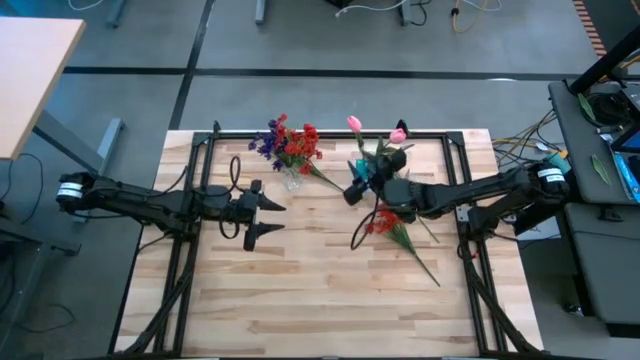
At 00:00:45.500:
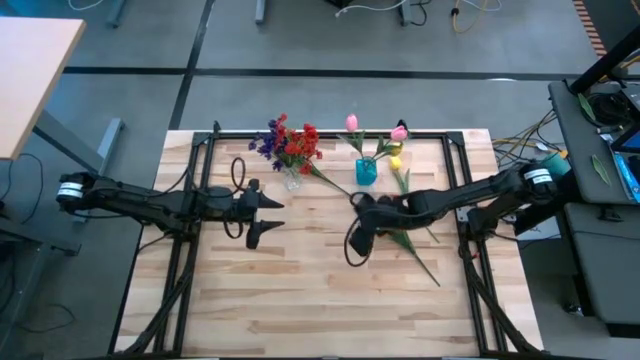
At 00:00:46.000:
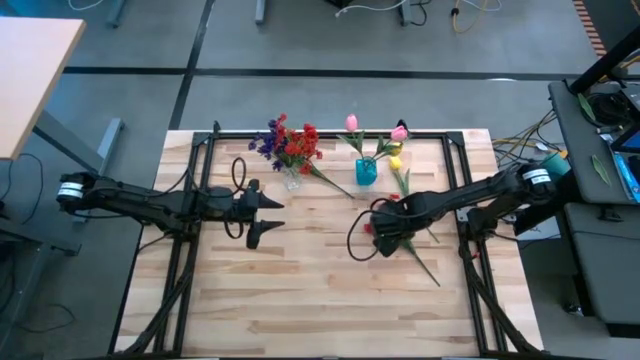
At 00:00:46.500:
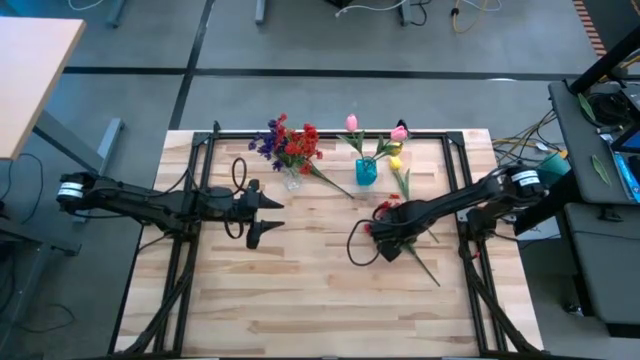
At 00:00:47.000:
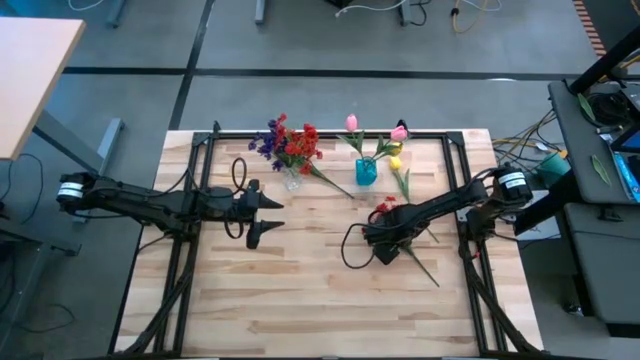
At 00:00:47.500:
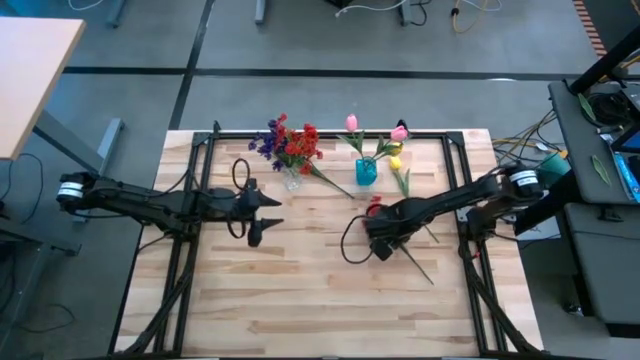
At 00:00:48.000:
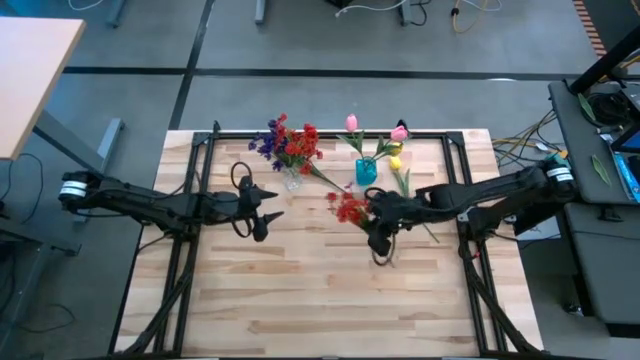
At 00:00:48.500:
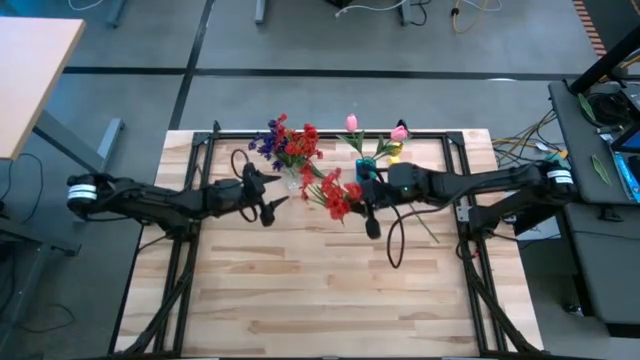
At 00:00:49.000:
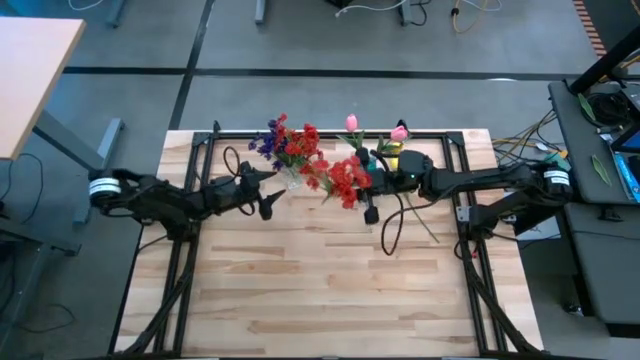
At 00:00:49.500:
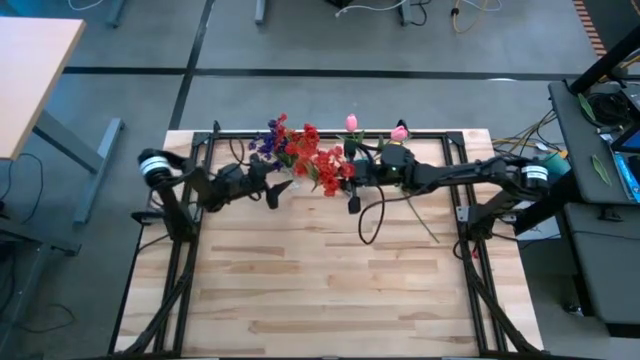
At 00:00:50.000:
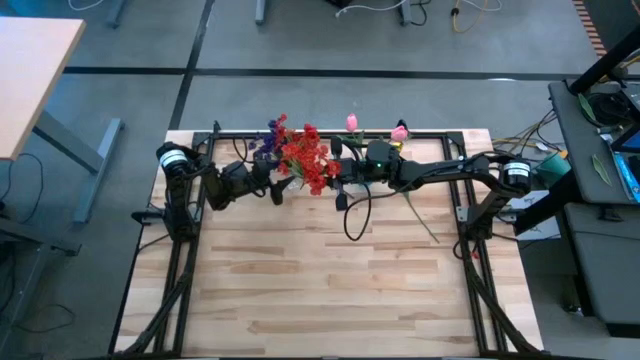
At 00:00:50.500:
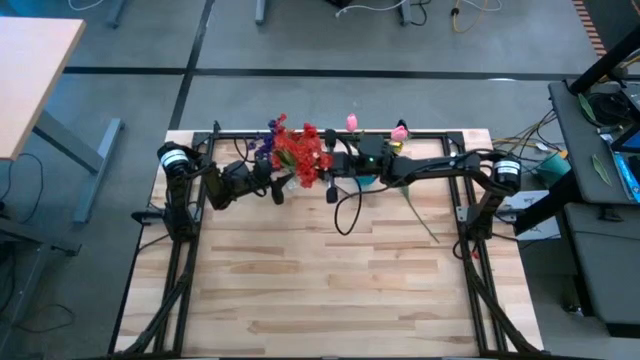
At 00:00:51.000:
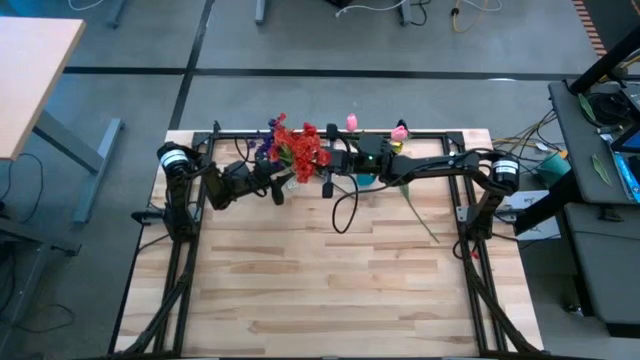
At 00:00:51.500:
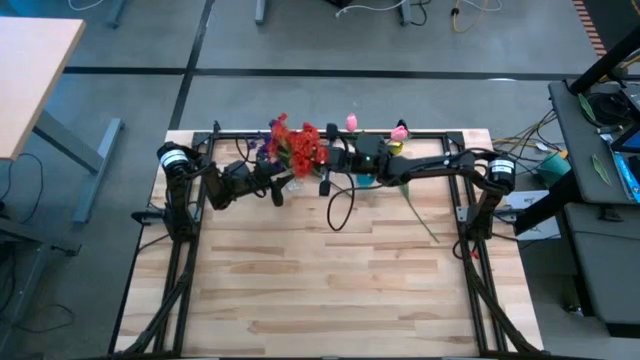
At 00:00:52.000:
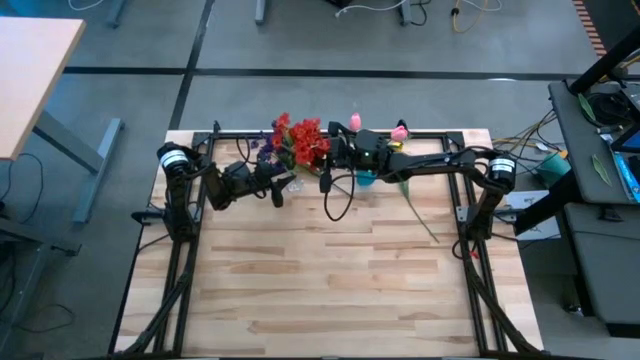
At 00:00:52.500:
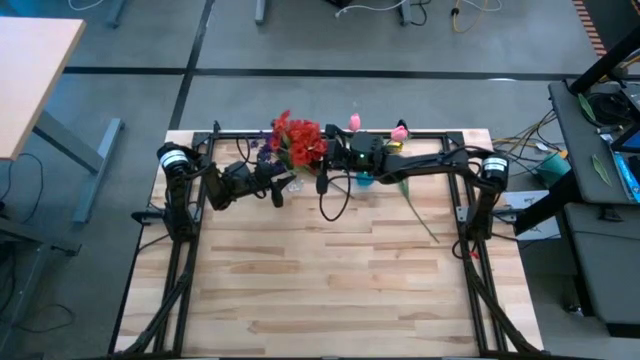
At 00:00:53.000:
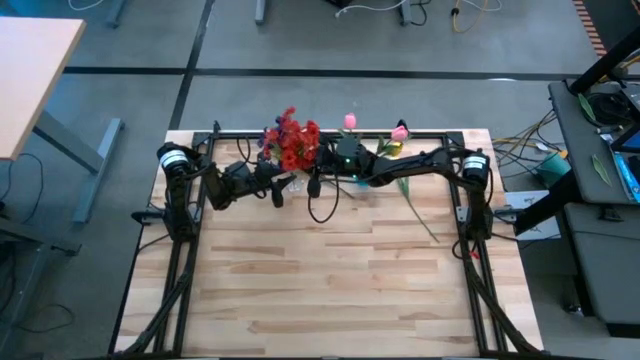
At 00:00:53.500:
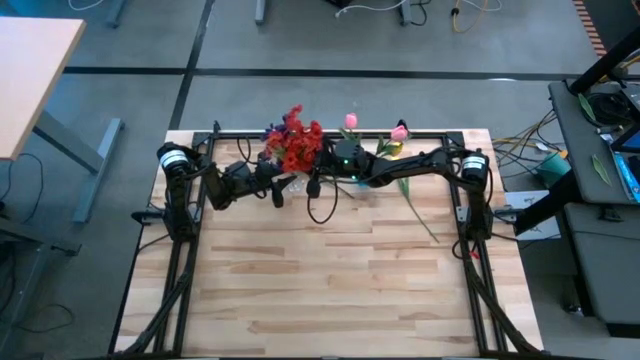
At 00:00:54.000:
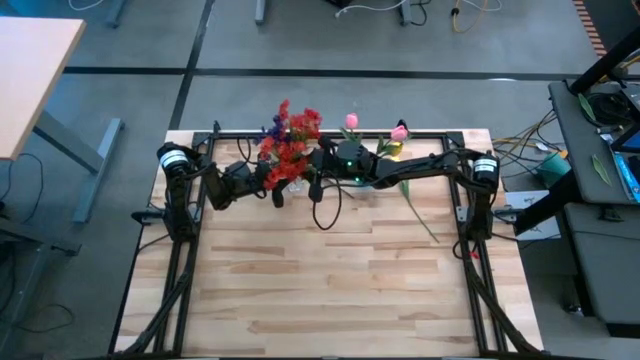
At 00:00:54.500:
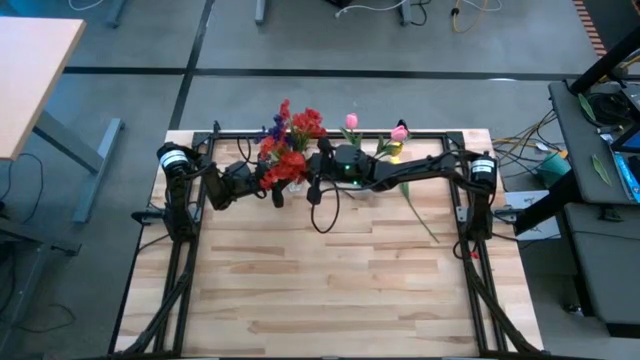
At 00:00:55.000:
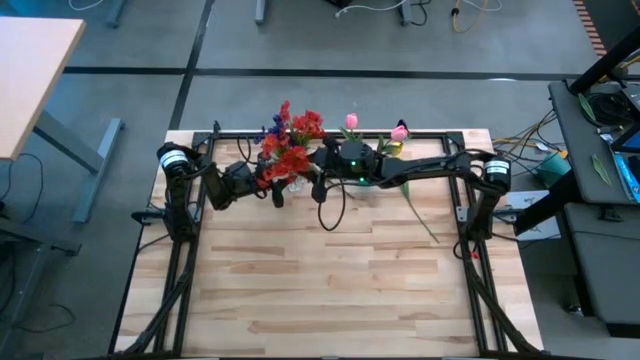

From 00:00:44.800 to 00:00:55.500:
Task: Sort flowers into vase by color
Put the red flowers into the transparent vase

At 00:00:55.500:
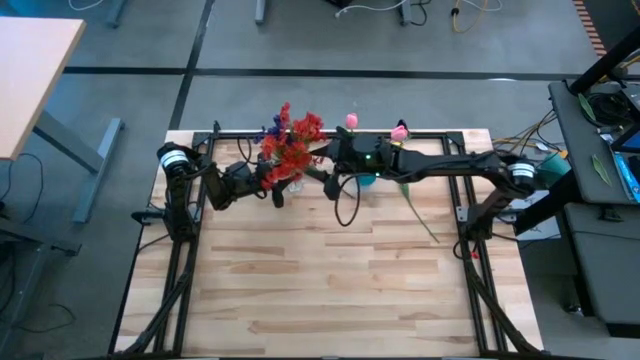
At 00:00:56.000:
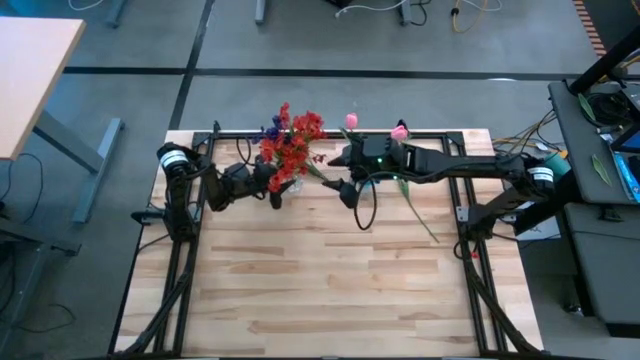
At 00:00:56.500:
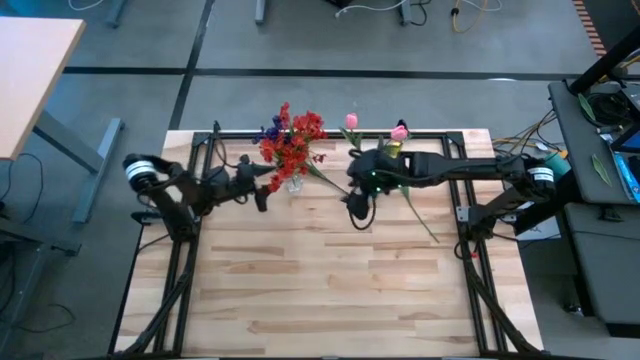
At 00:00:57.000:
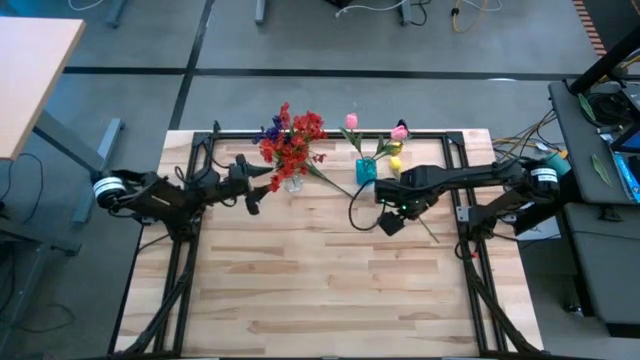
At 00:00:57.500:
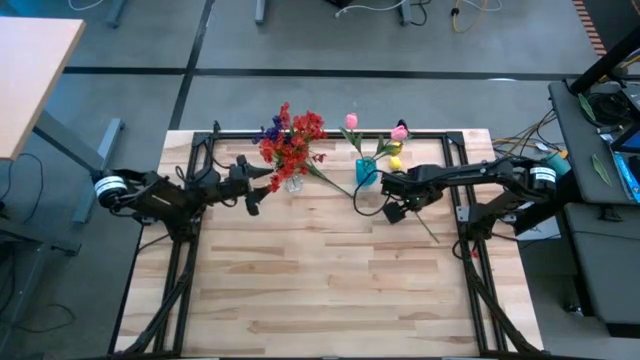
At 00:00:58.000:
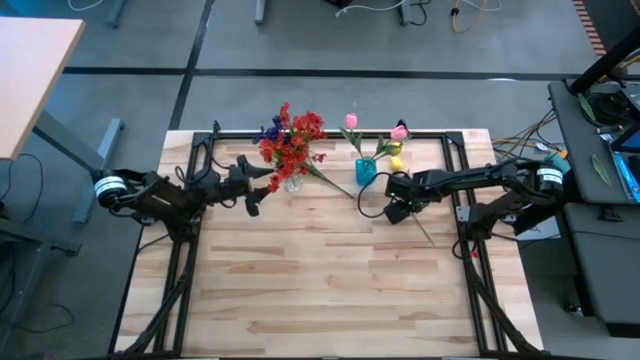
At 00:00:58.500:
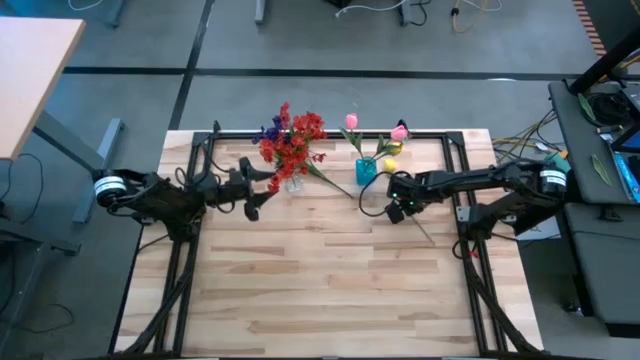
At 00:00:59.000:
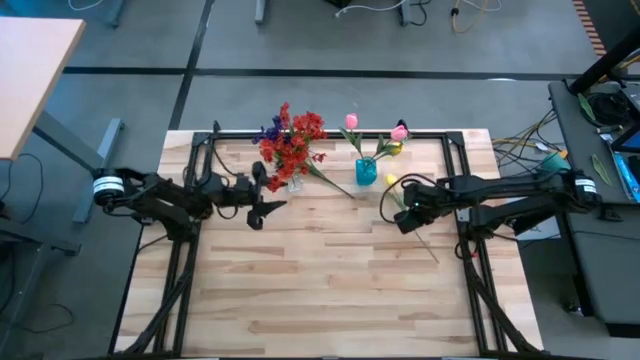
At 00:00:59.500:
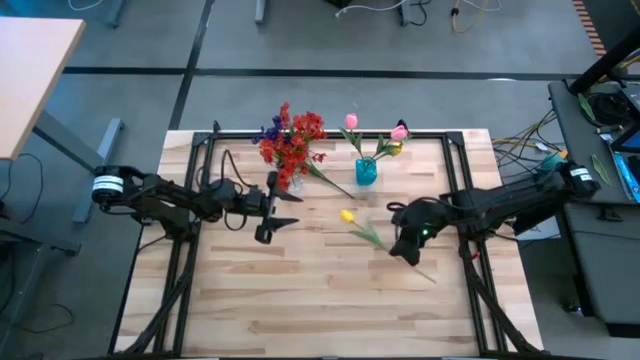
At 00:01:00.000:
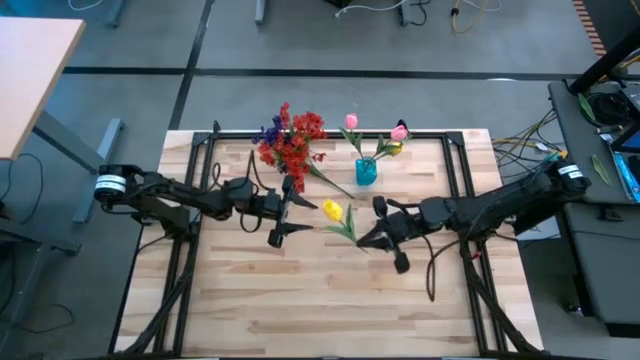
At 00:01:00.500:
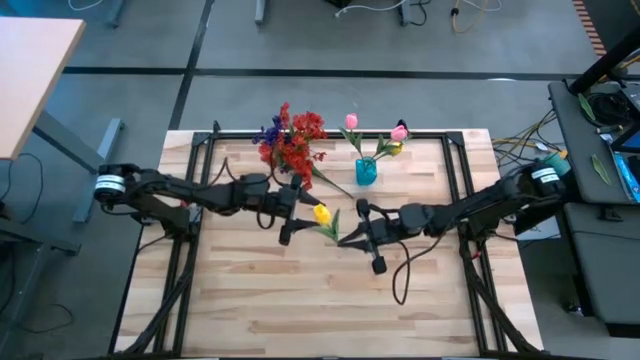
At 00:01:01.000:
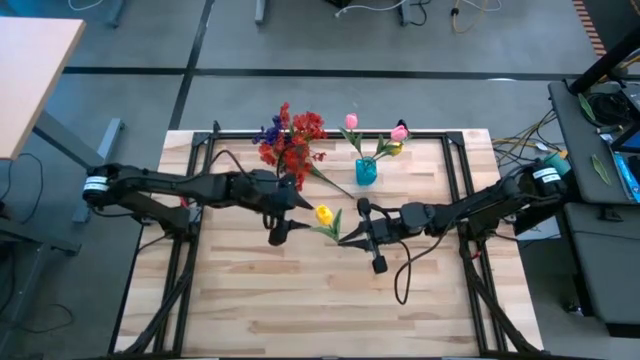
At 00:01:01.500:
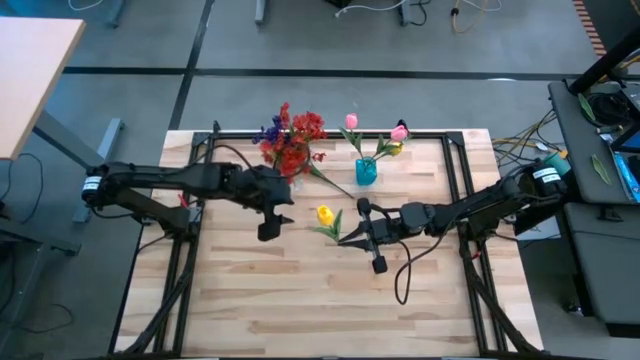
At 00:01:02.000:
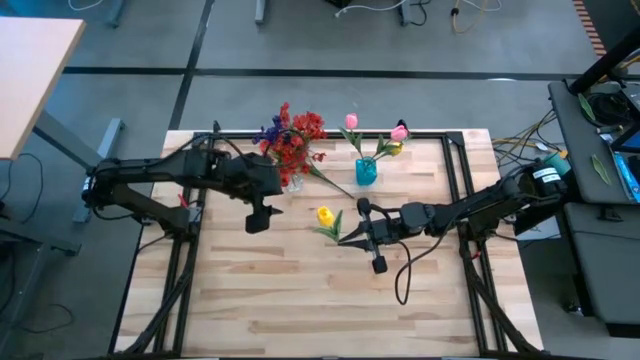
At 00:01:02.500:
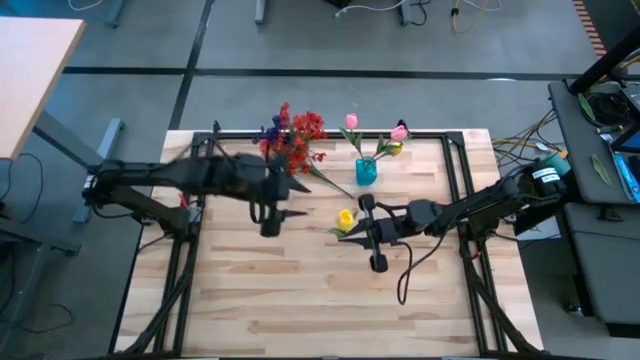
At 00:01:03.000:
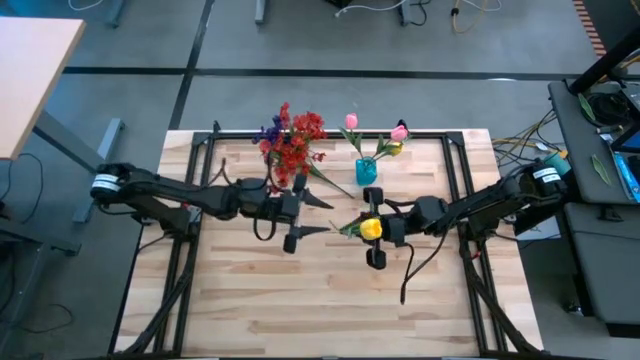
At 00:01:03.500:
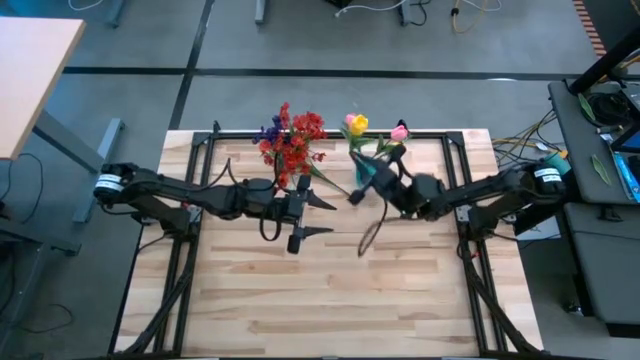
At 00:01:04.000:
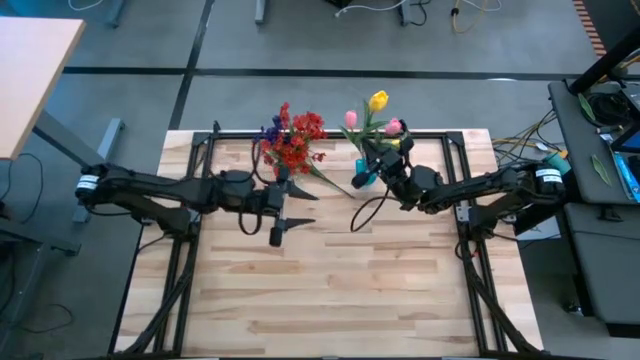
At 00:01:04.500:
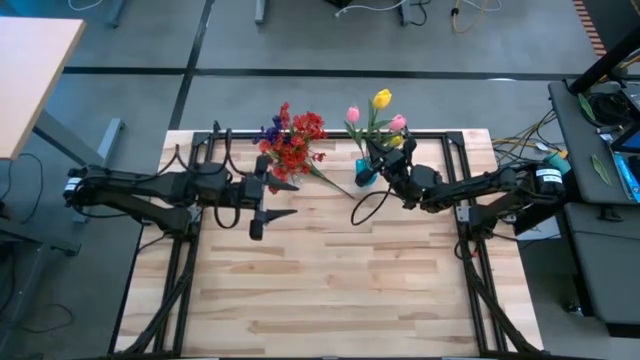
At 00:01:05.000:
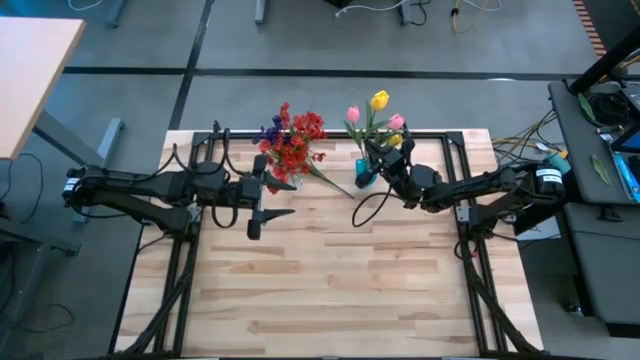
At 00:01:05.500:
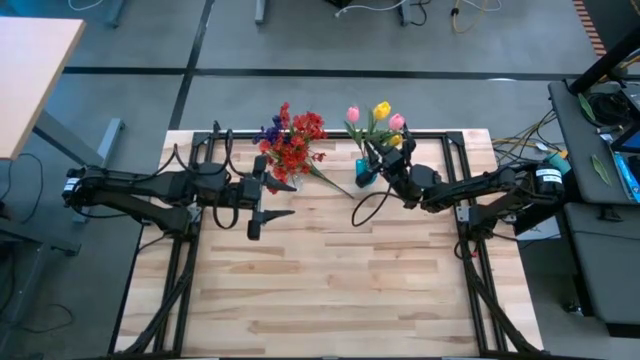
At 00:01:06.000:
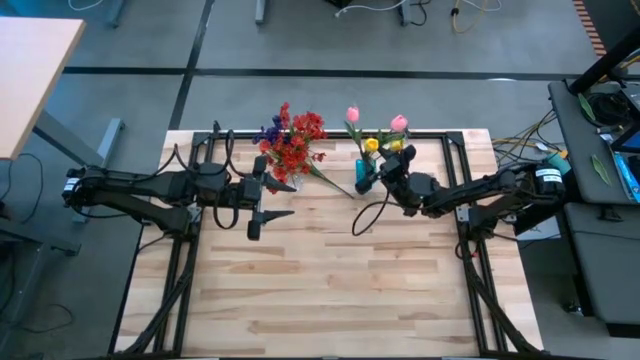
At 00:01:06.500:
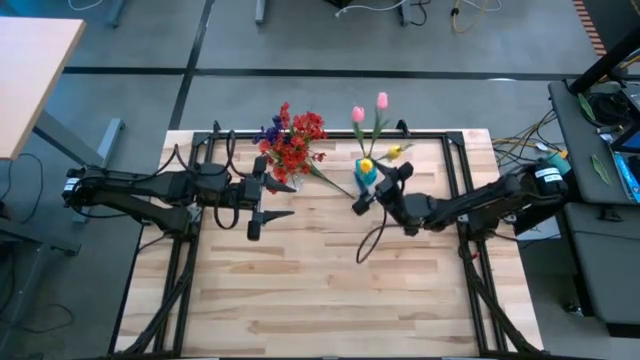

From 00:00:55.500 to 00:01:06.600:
Put the yellow flower into the blue vase
